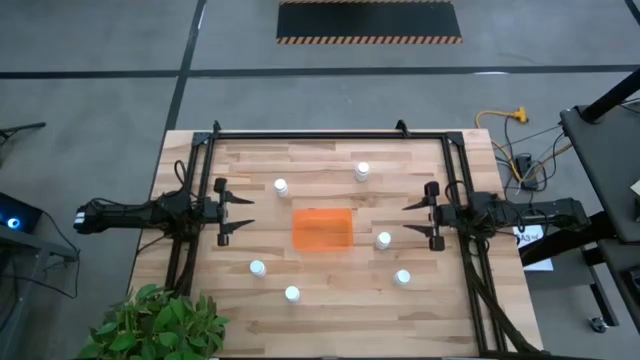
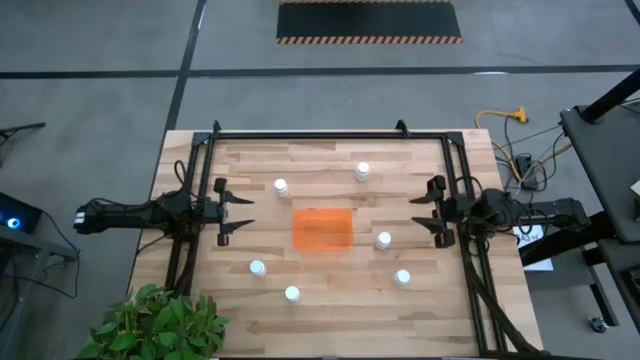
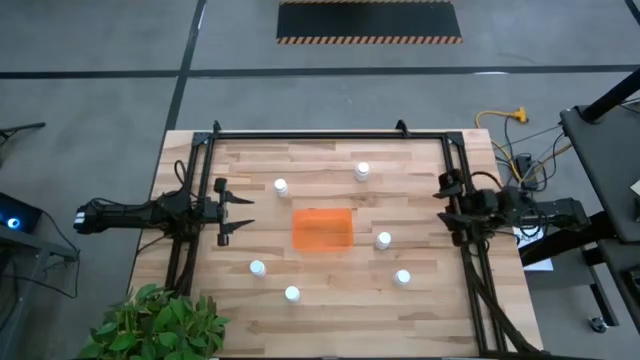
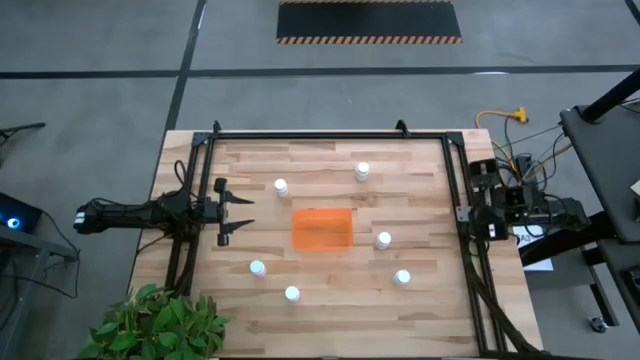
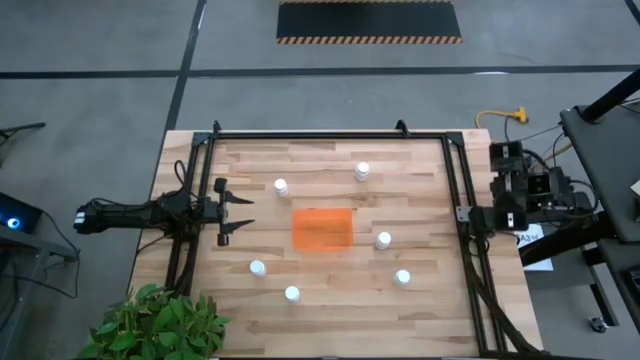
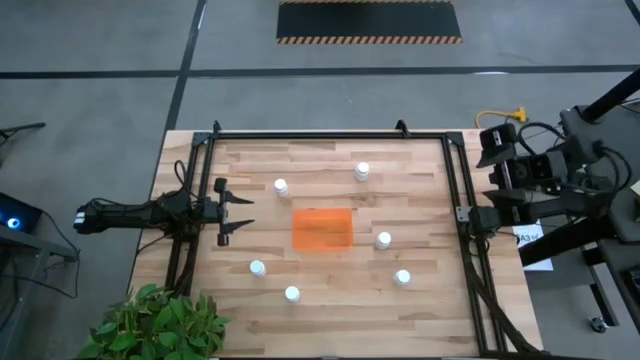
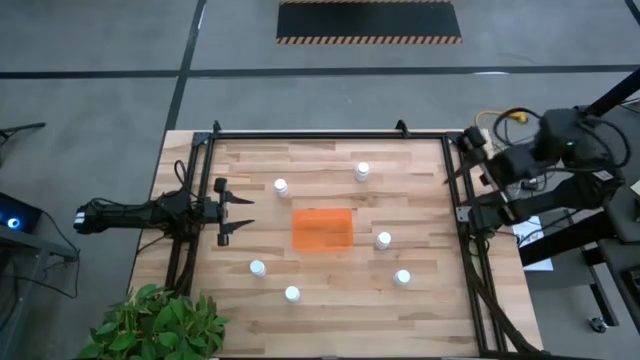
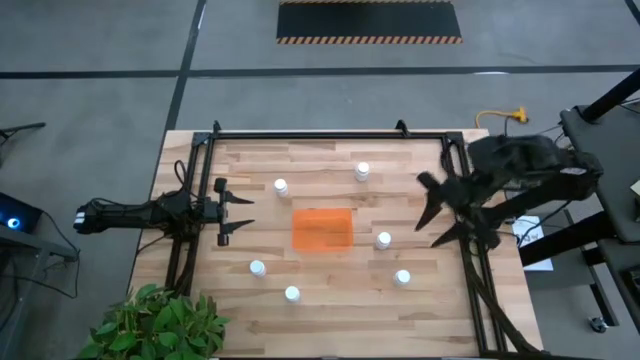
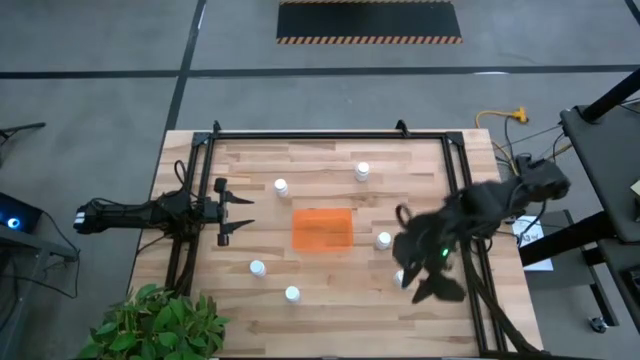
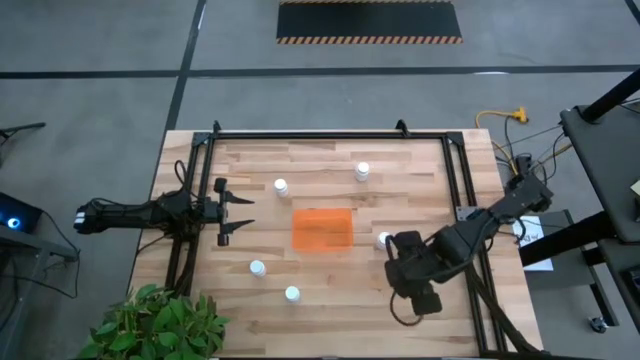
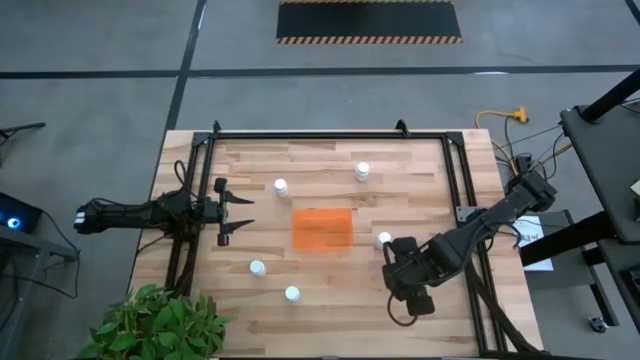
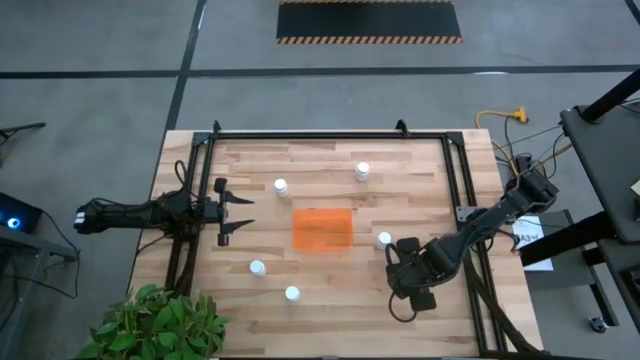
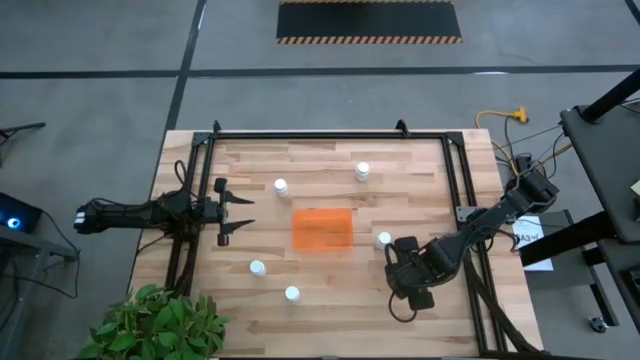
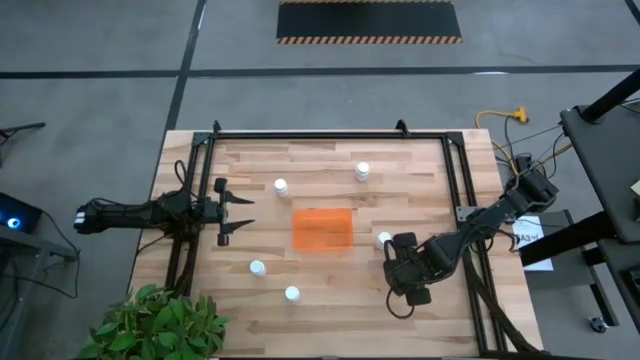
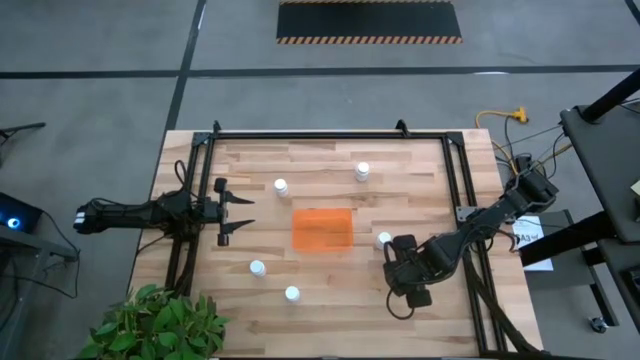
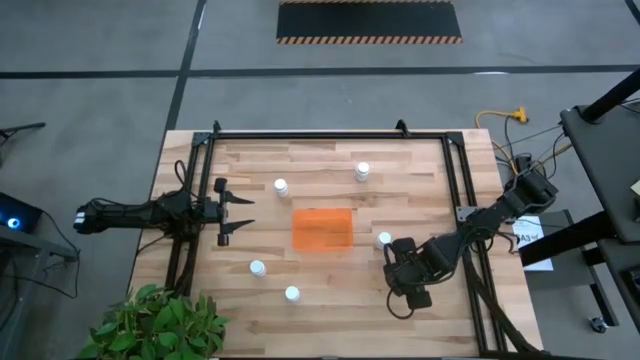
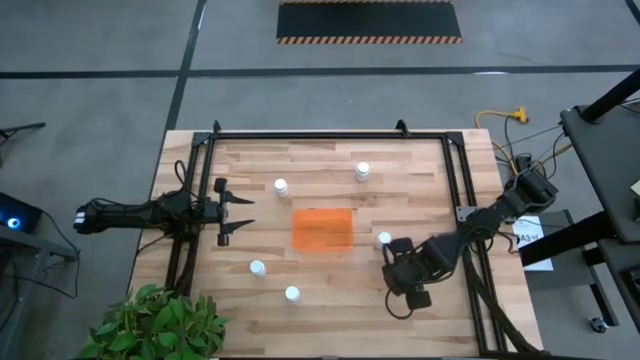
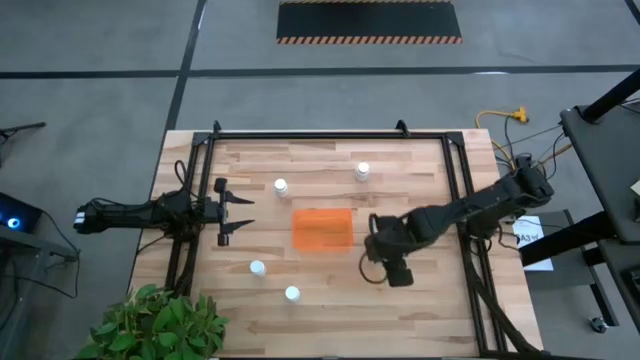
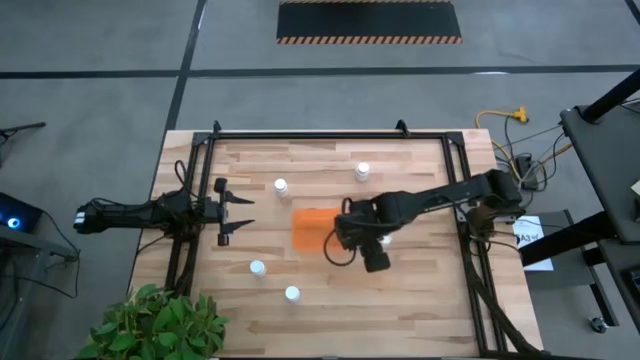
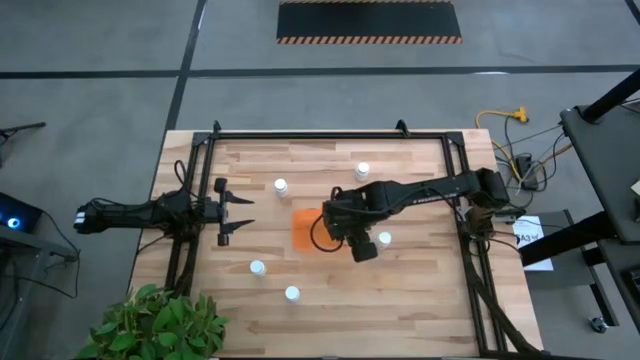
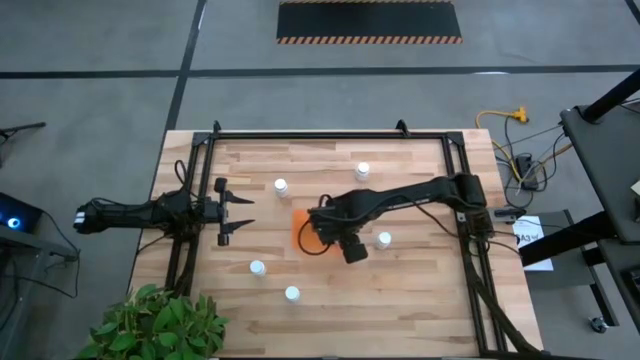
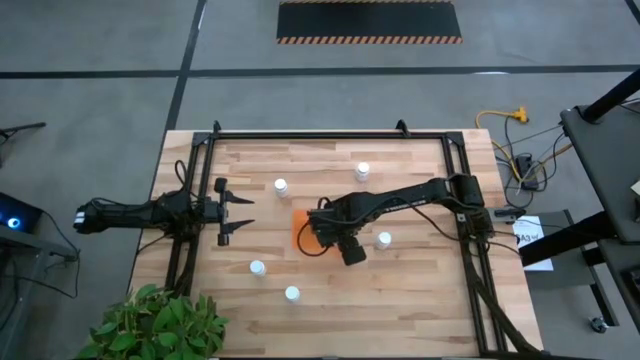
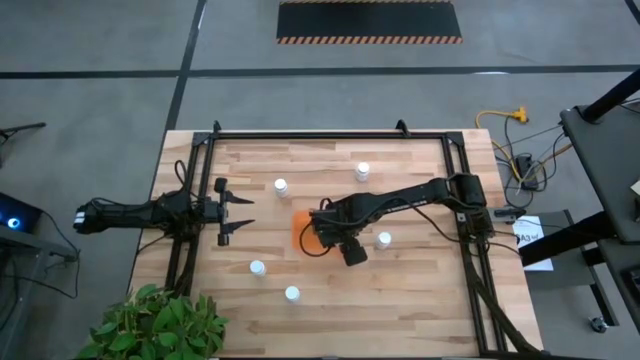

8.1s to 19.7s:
Task: Pick and place pill bottles into a basket
Put the white medicine bottle into the orange bin

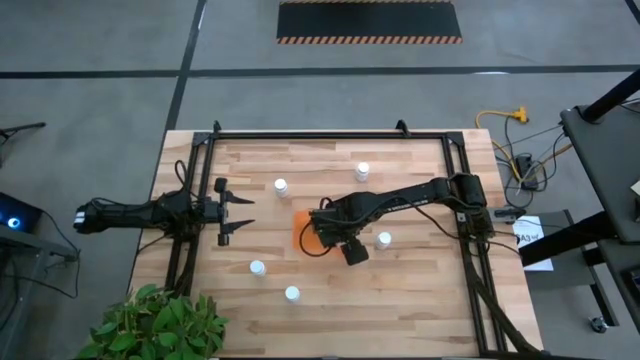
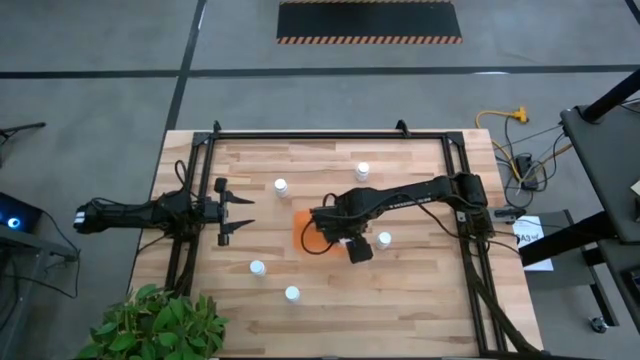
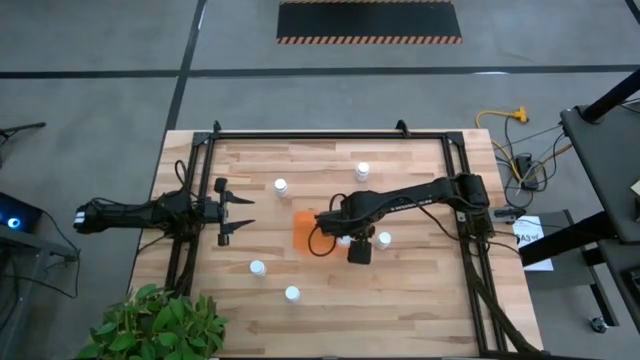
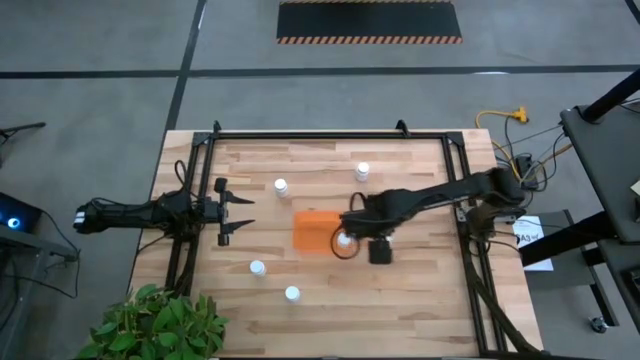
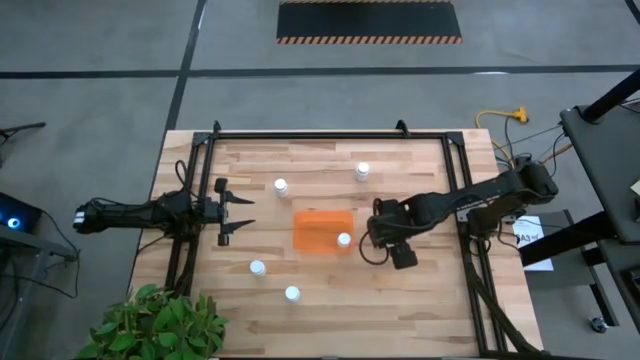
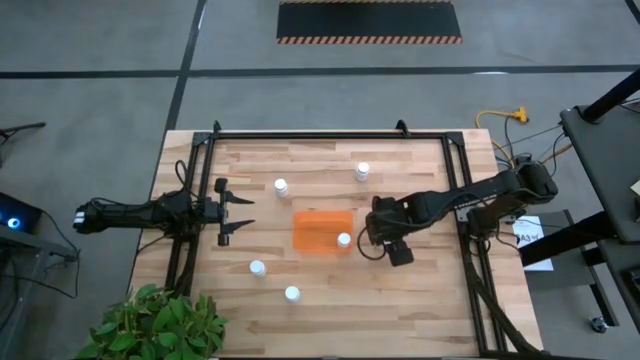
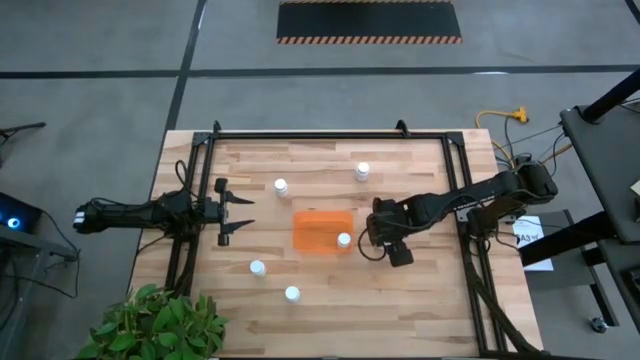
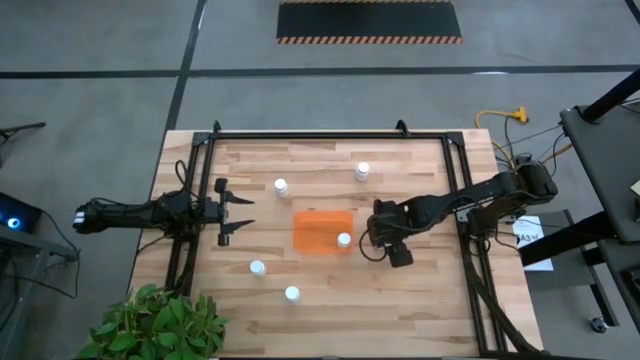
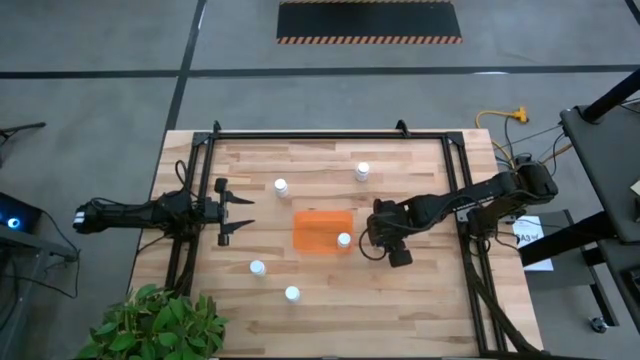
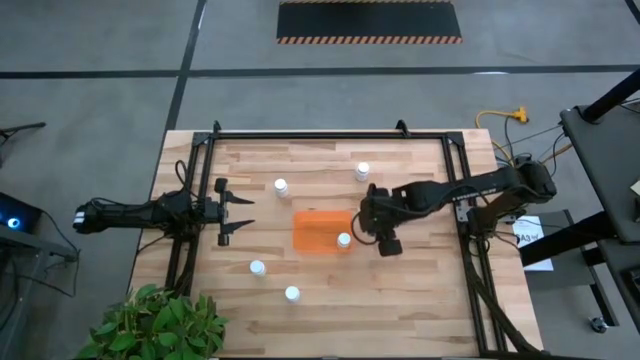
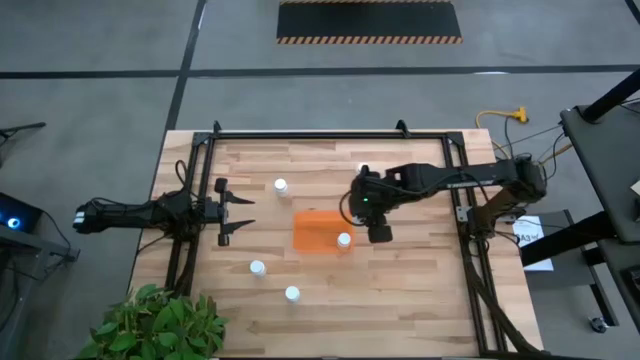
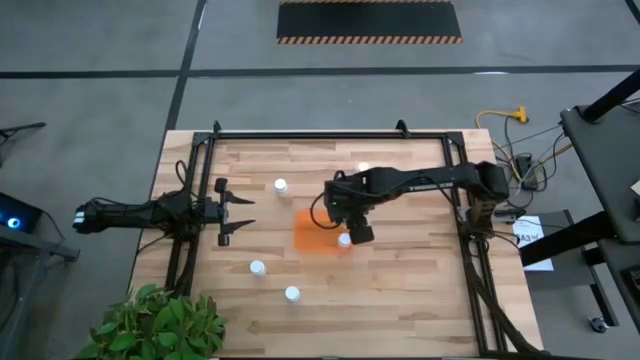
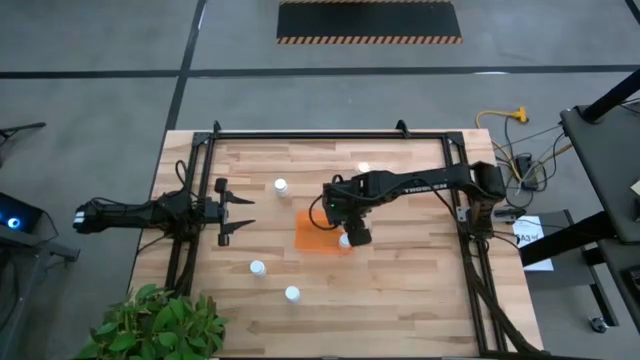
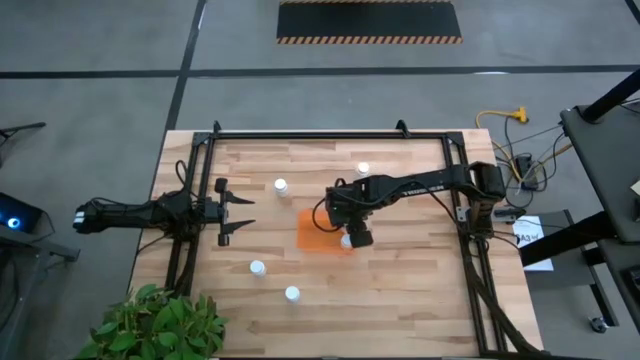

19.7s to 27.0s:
Put the white medicine bottle into the orange bin

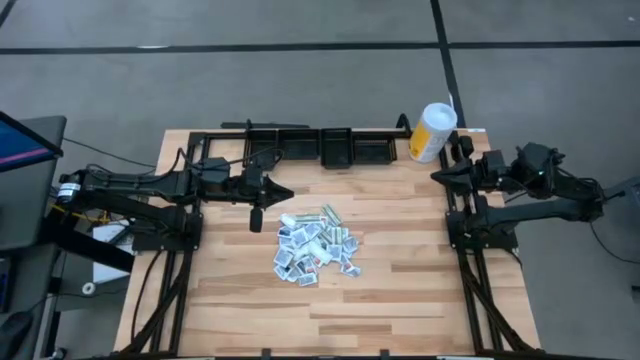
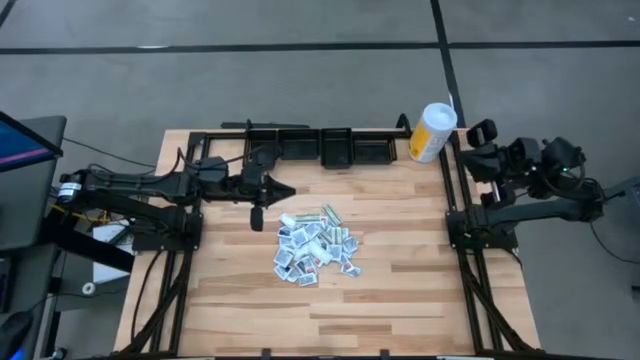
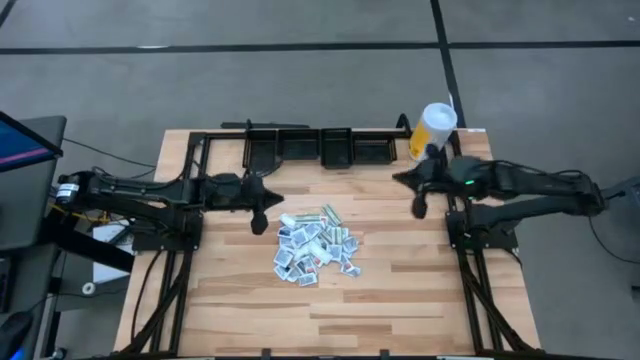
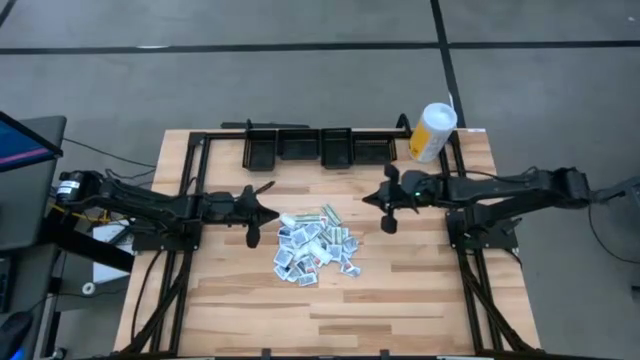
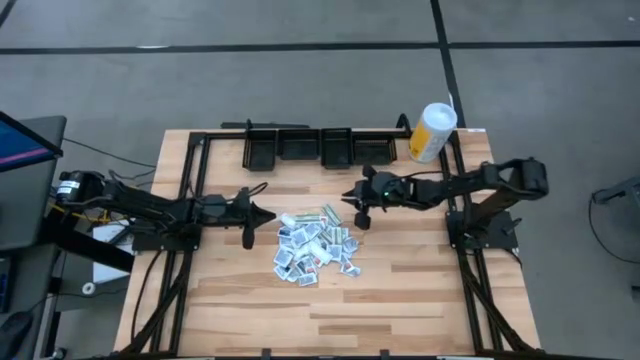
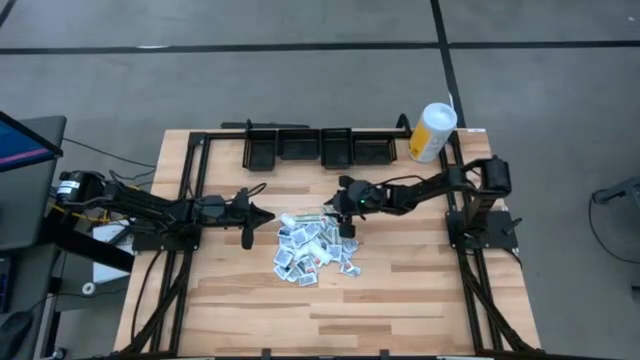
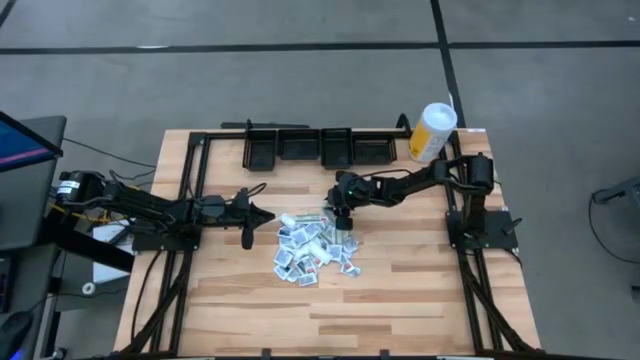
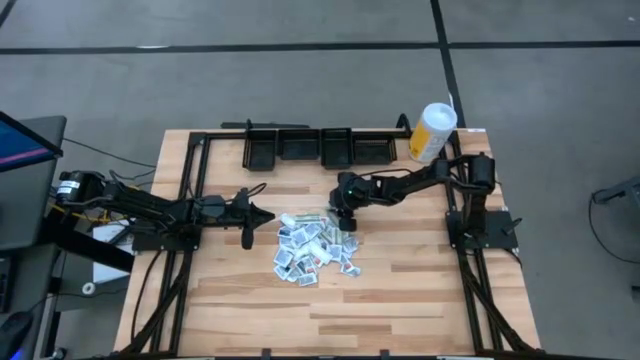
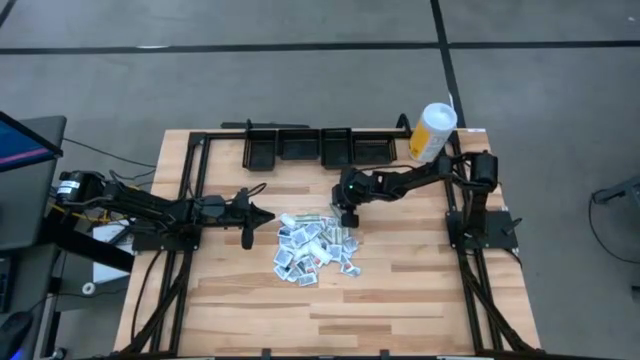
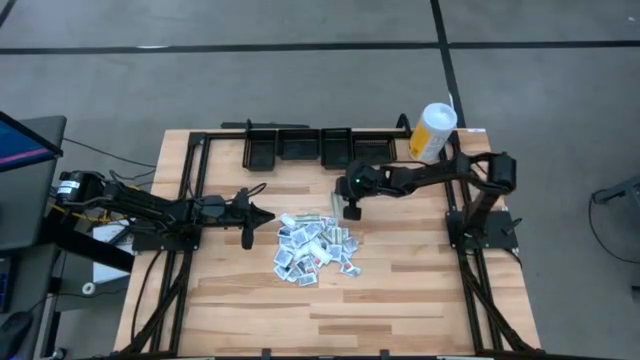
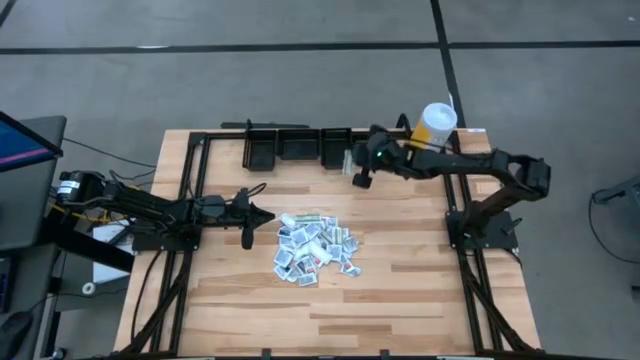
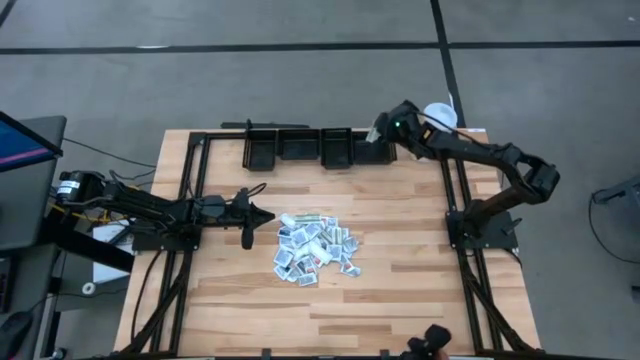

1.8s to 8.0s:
Task: Pick & Place First Aid Supplies
Put the green bandage pack into the right black bin
